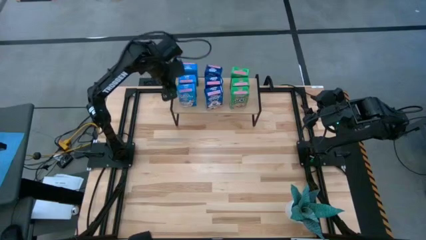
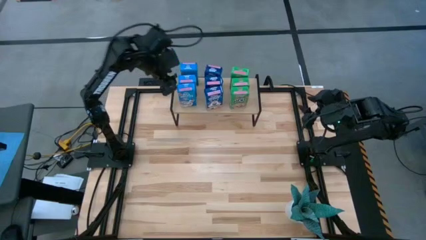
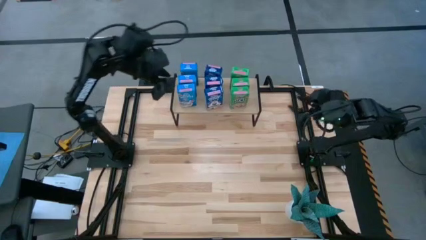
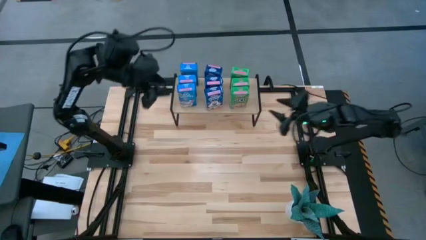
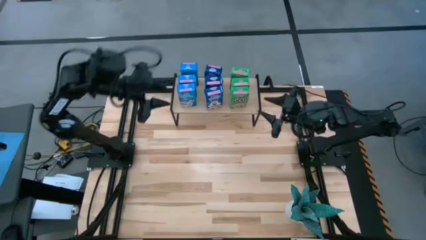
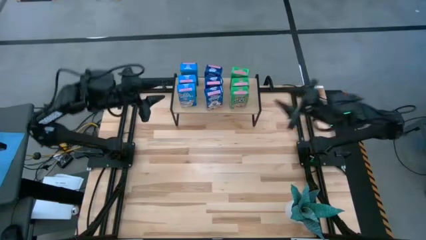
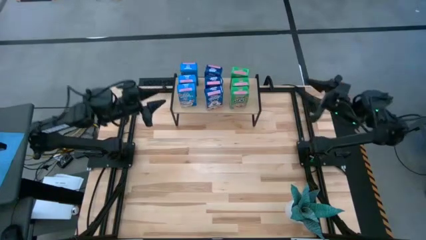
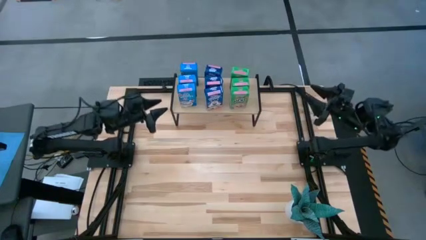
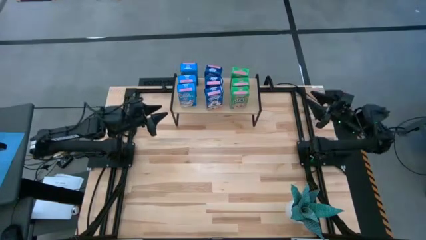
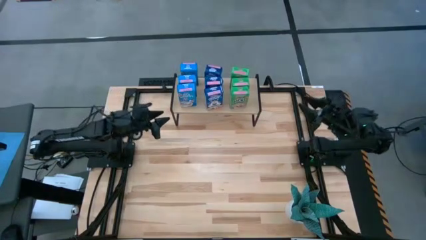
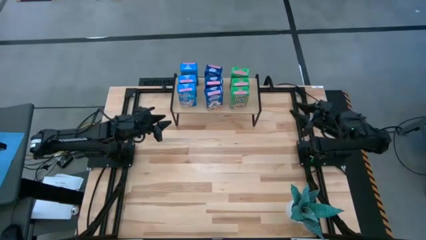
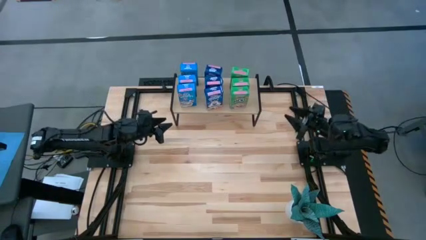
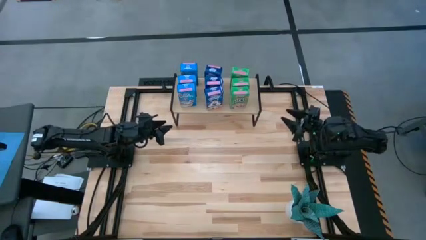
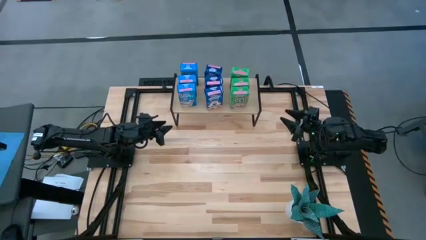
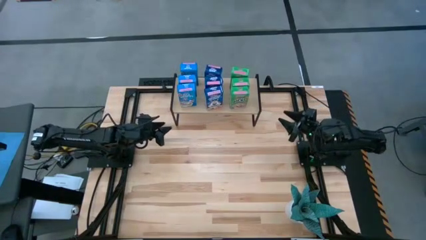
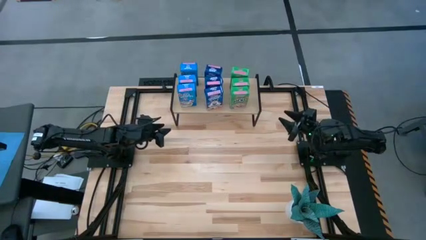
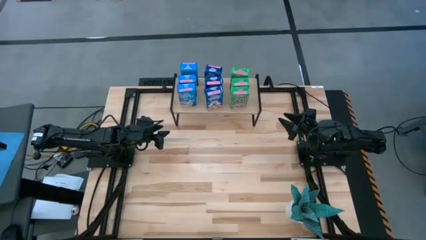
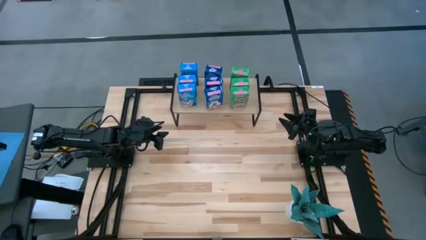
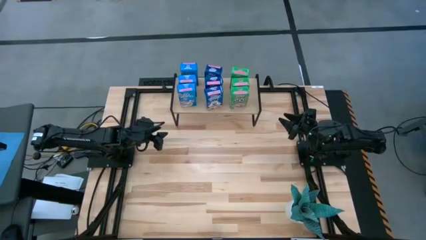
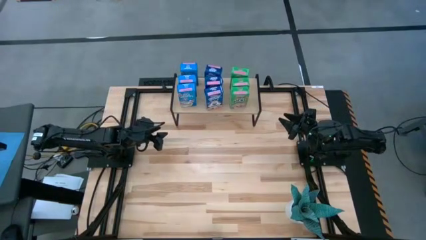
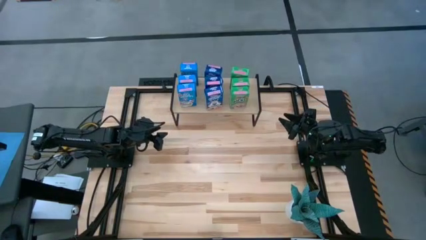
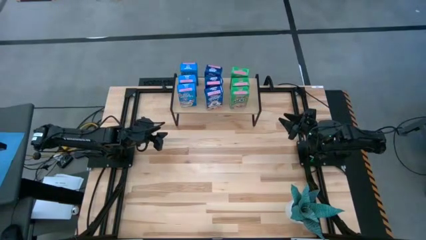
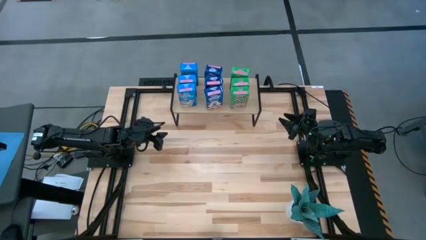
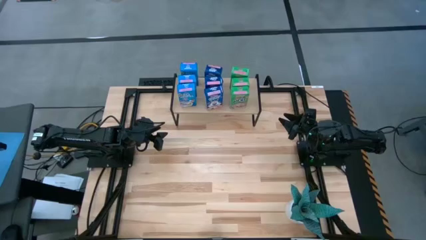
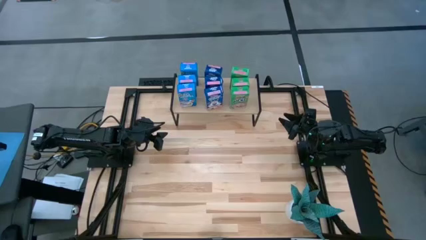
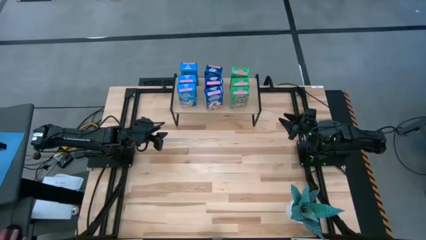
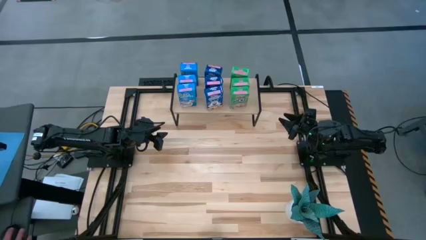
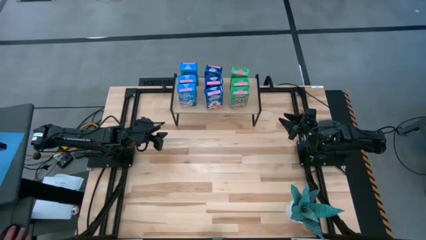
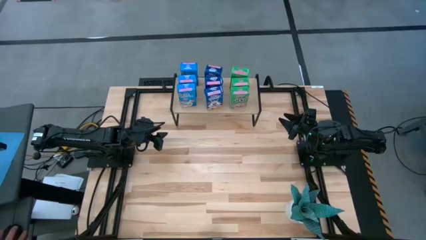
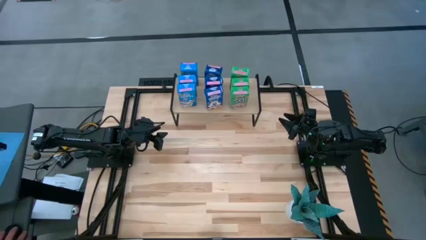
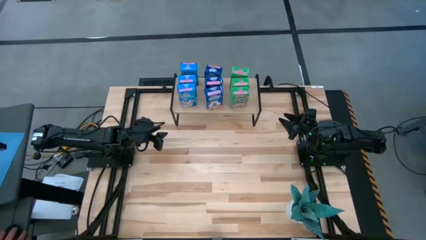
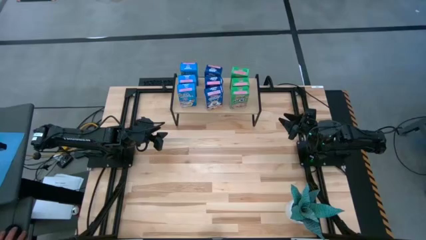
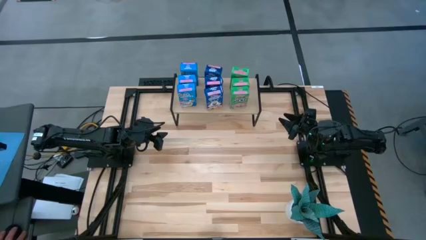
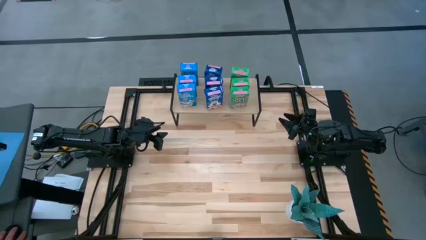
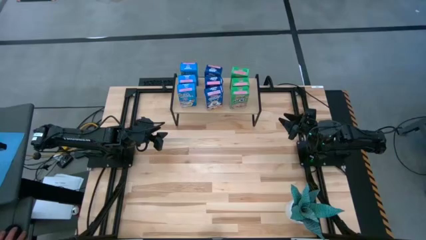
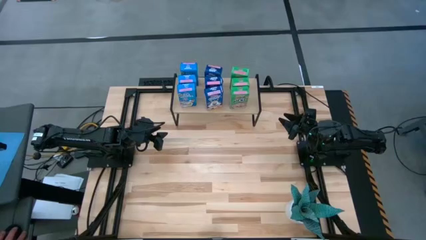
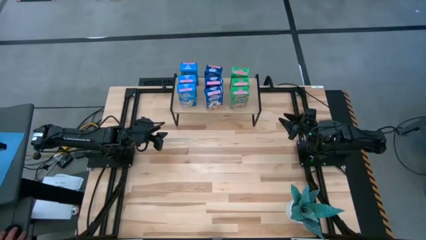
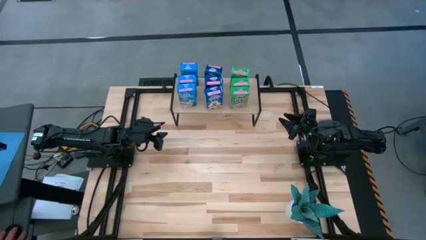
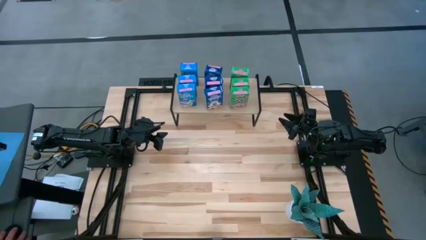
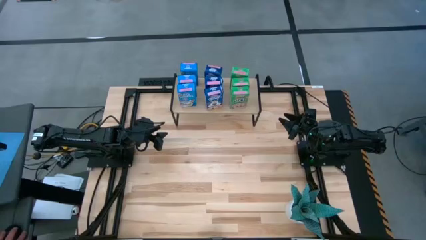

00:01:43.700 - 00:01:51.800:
Task: Stack cereal on shelf
Return to Home Position

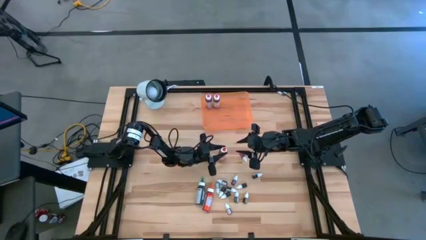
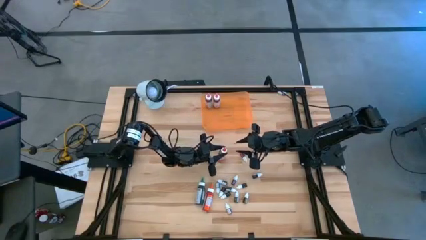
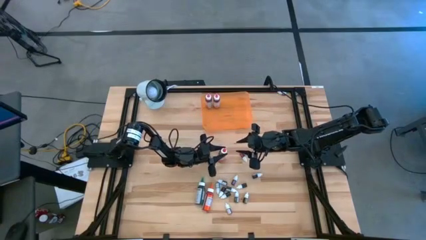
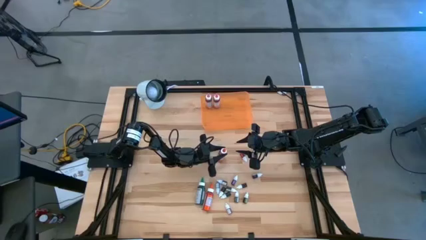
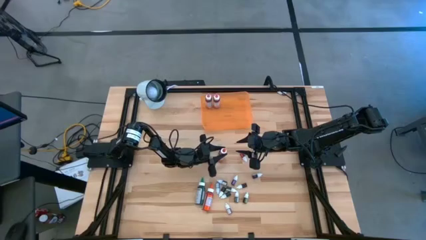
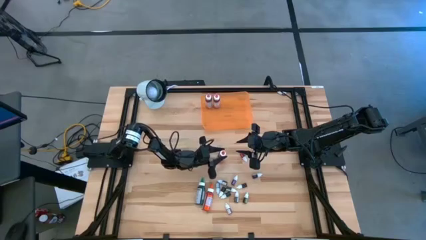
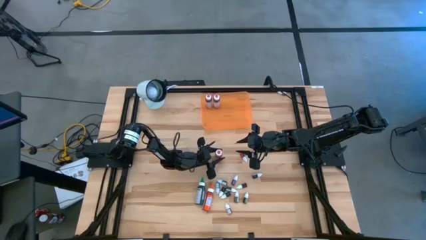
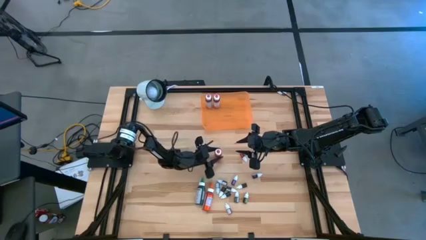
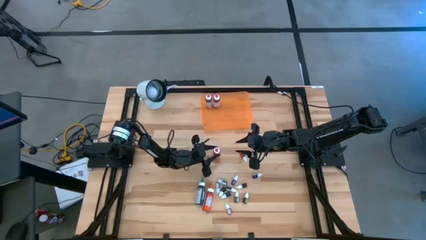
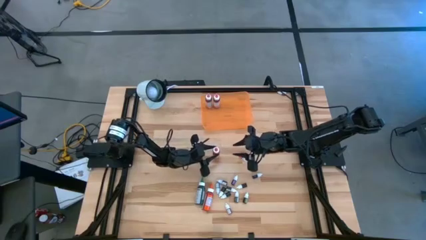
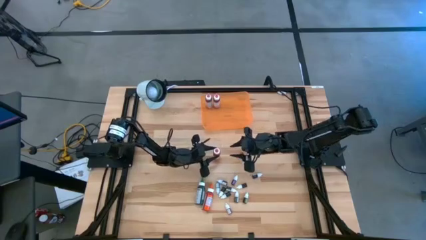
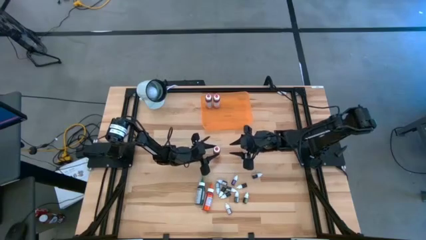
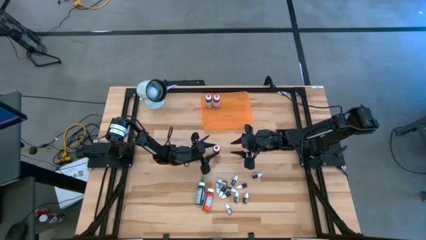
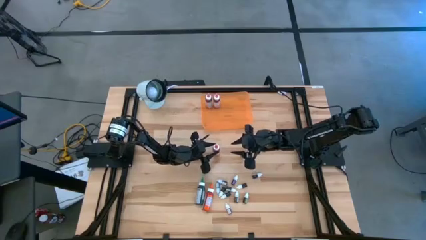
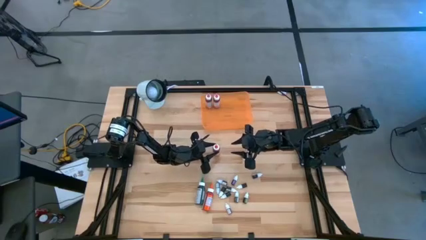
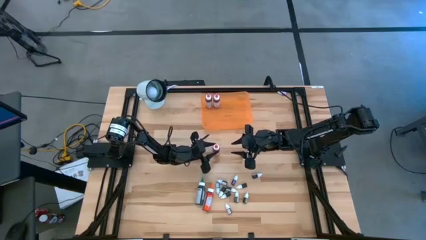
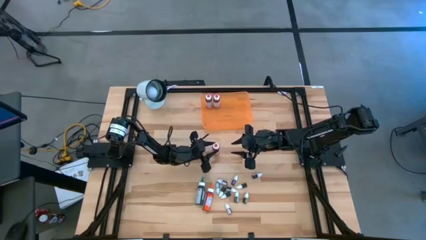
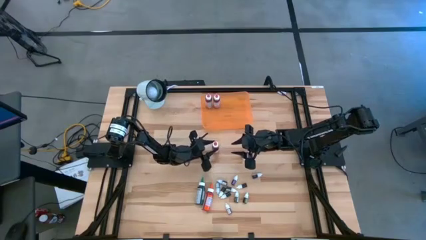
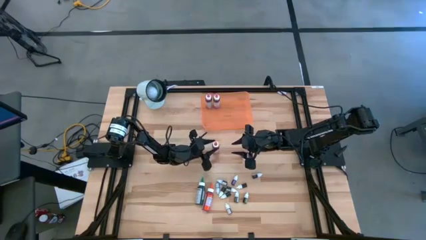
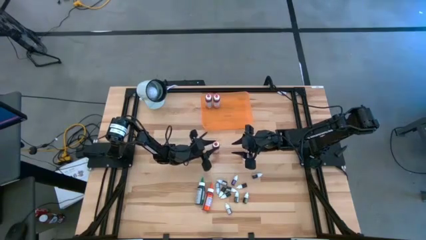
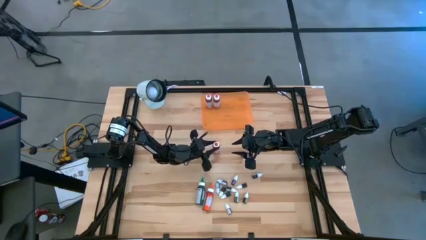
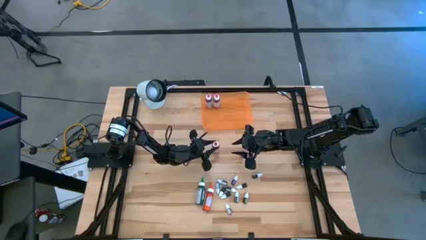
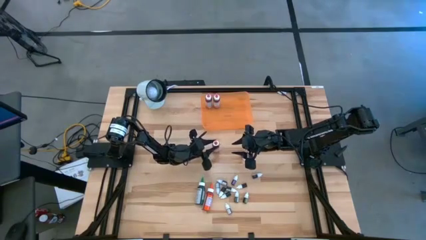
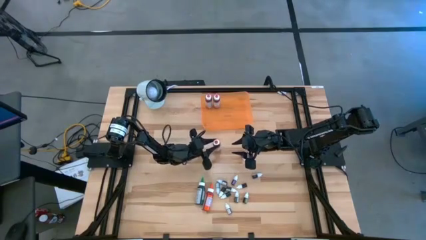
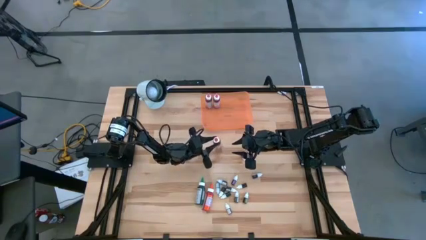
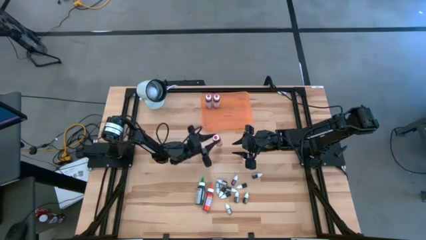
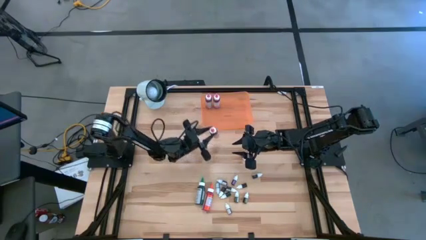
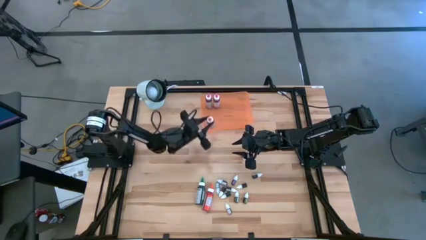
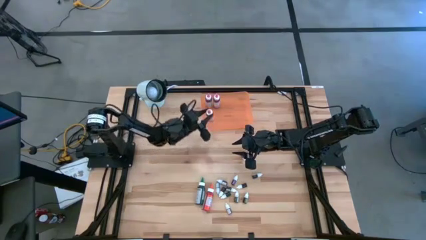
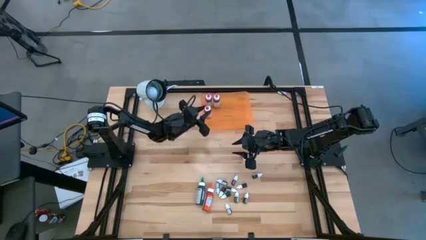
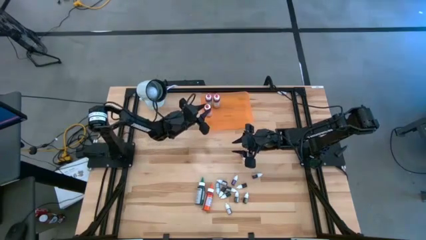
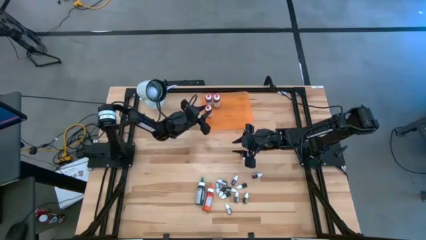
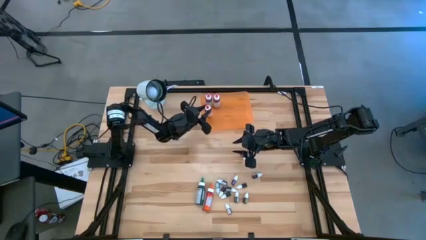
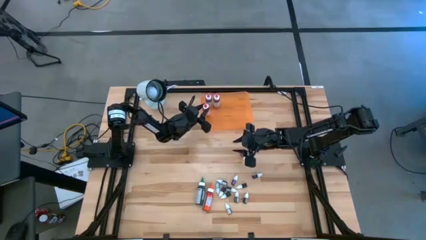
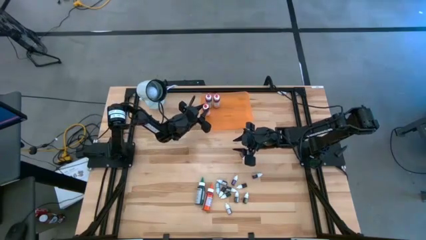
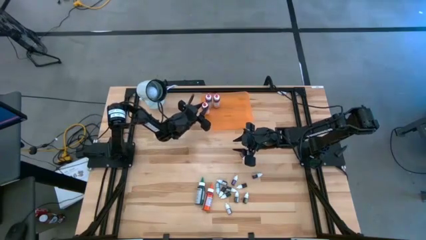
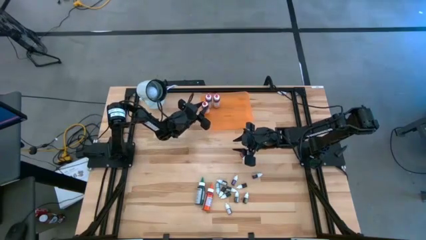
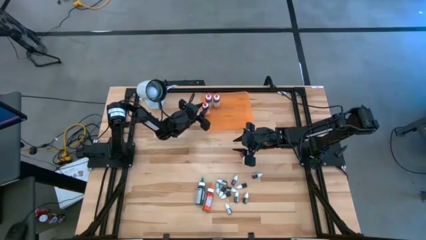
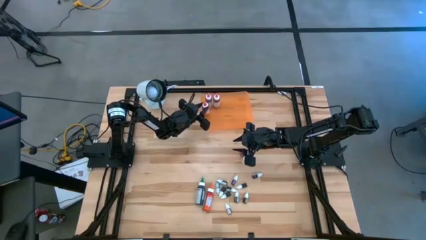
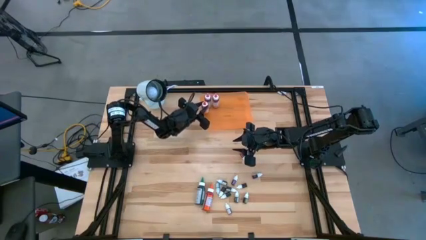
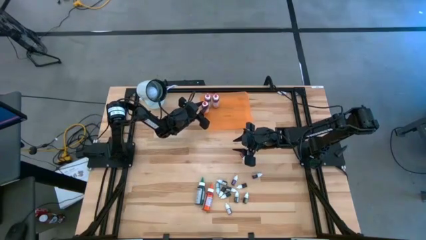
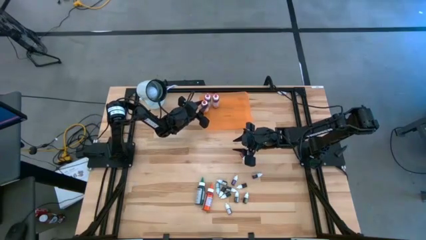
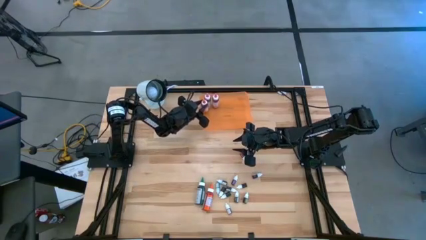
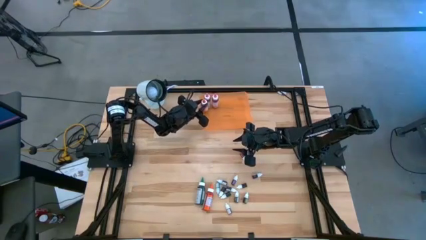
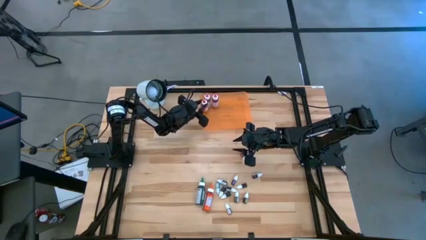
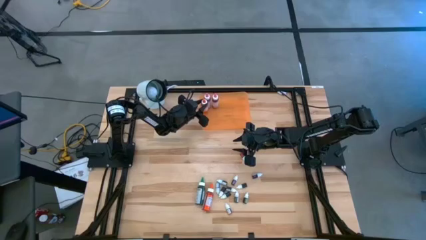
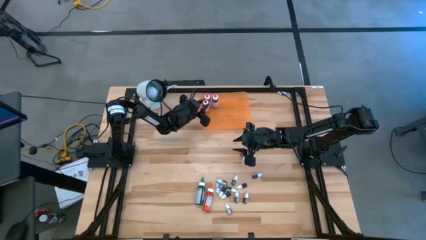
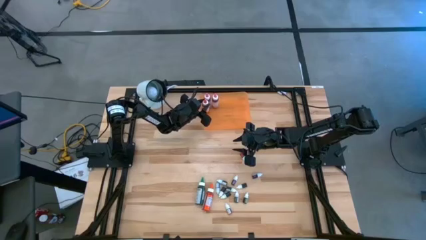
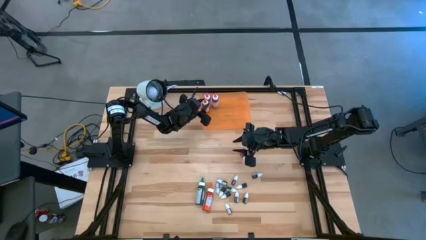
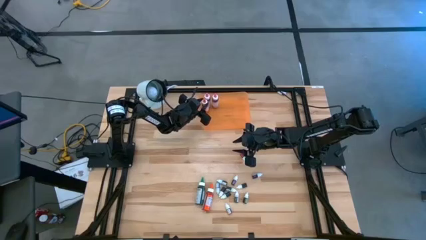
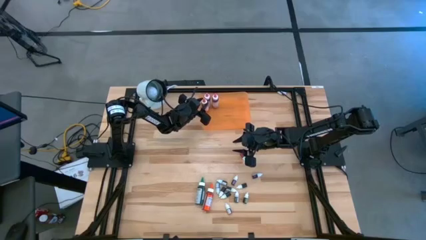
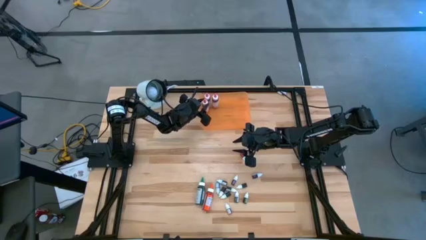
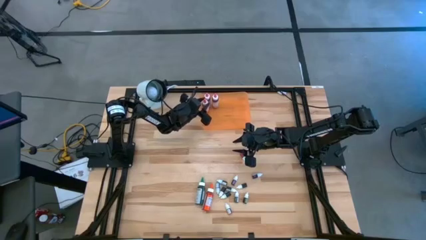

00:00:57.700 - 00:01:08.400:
Task: Pick & Place food coloring
Put the large orange food coloring bottle into the orange bin
